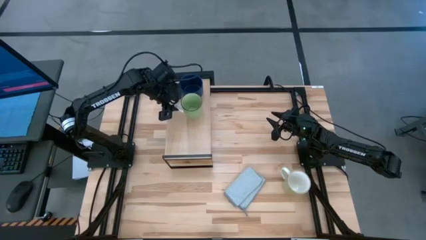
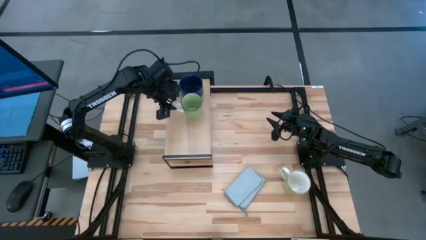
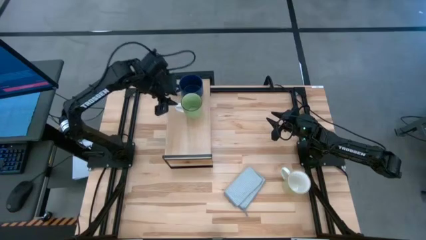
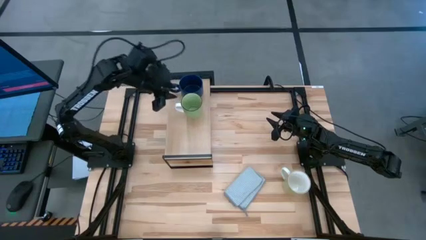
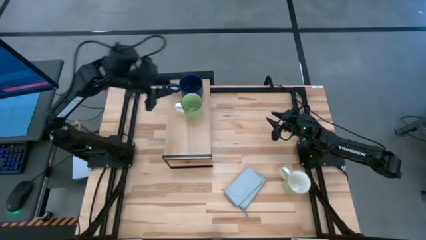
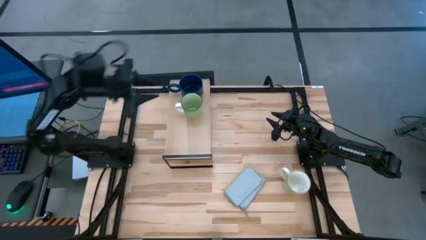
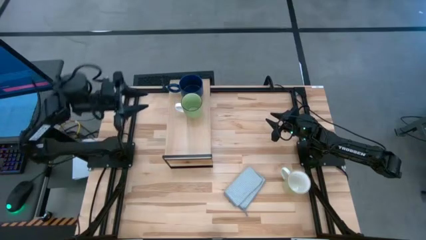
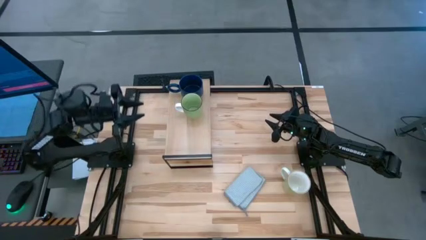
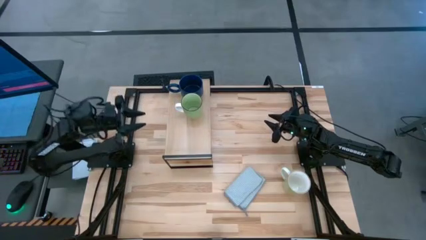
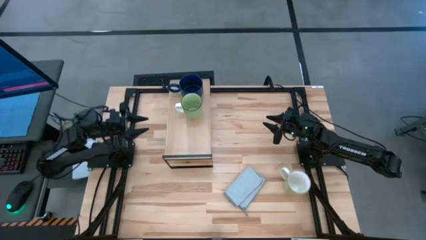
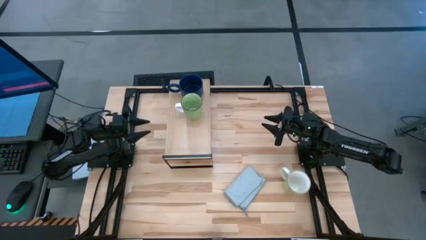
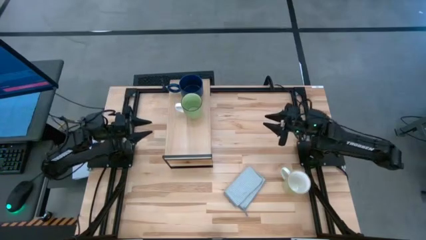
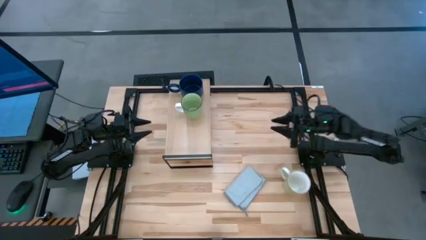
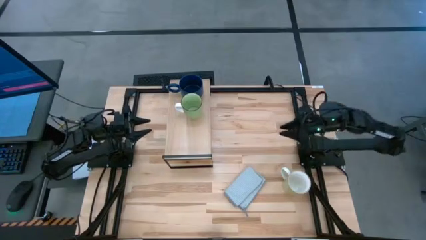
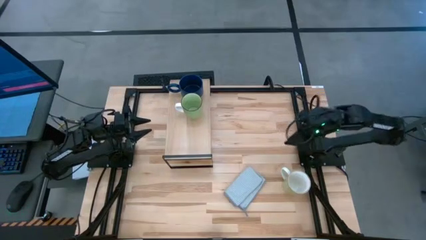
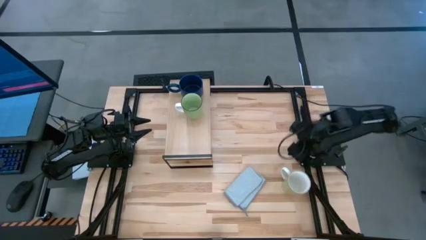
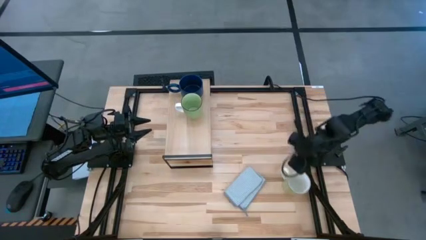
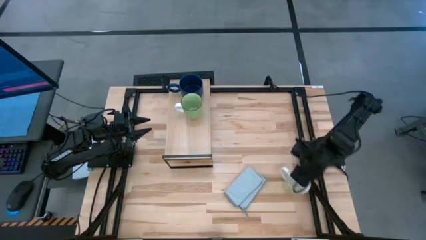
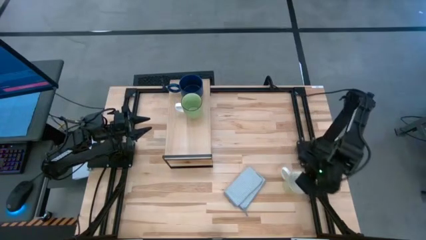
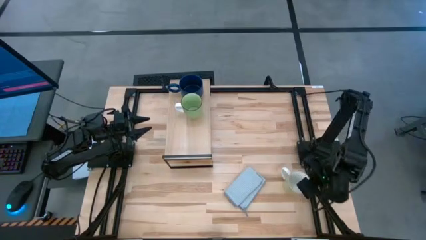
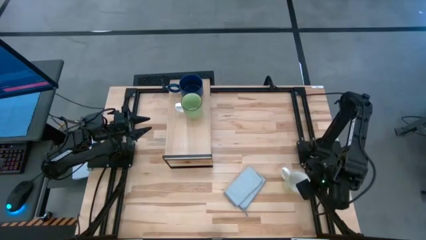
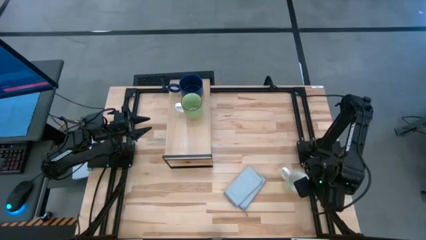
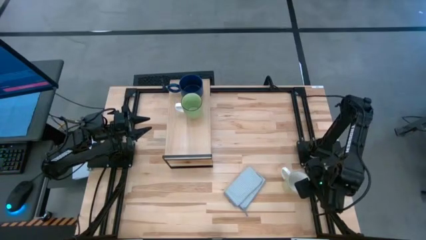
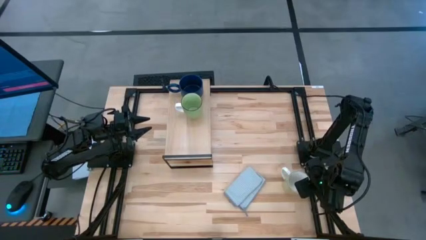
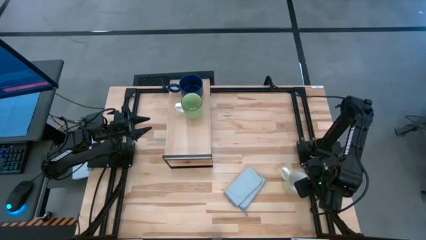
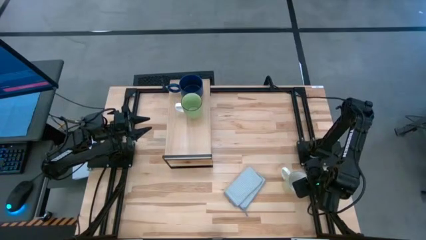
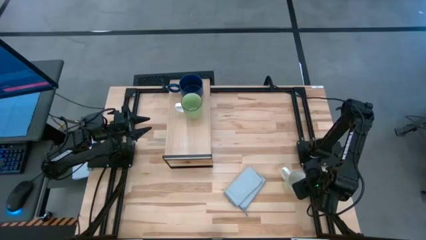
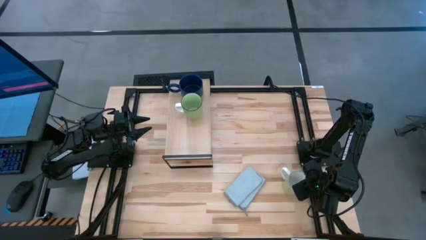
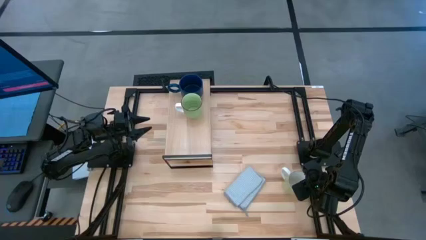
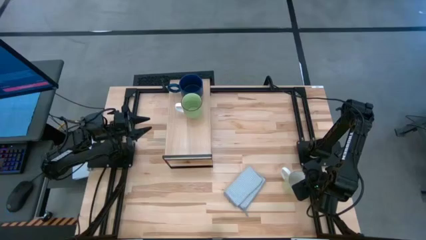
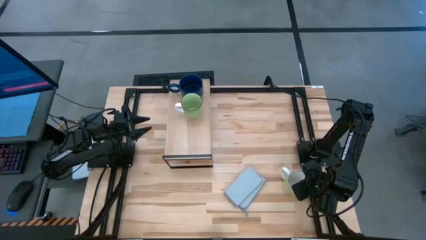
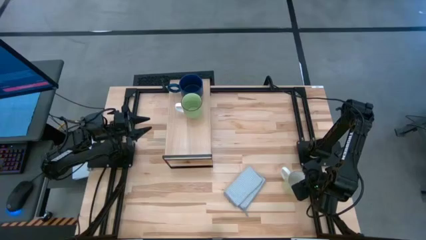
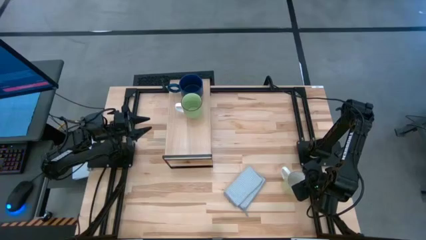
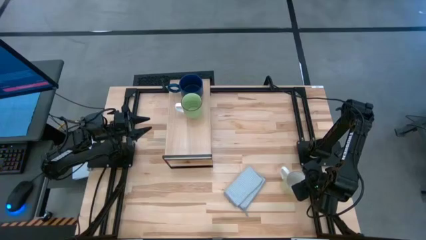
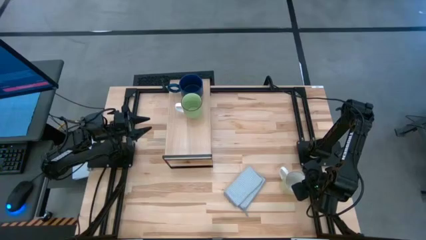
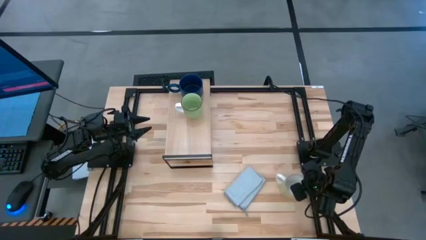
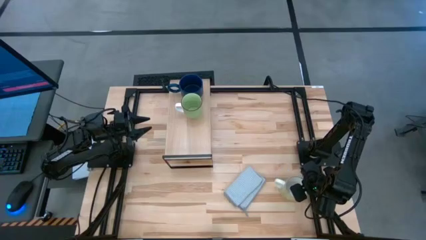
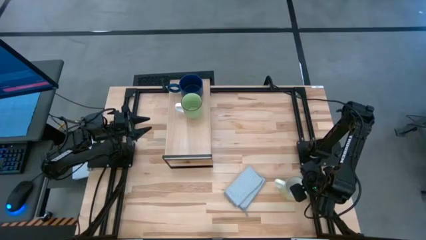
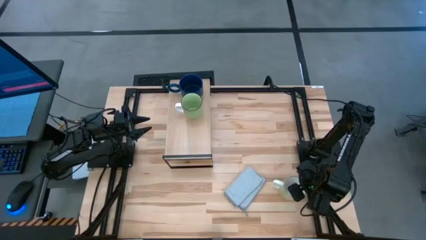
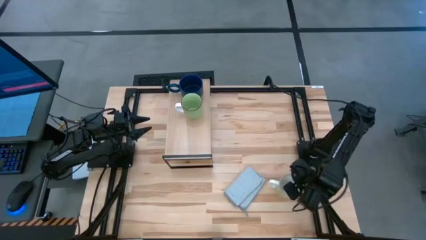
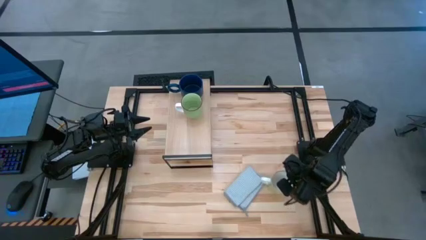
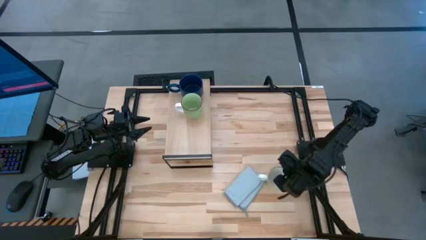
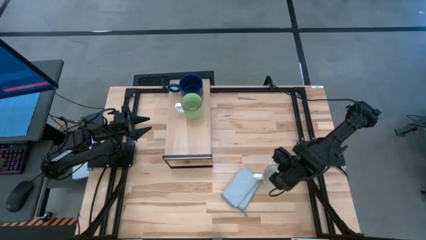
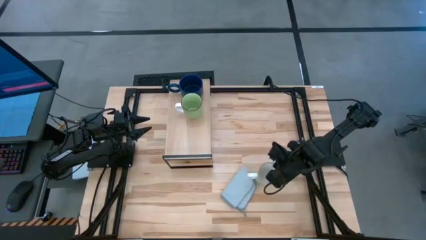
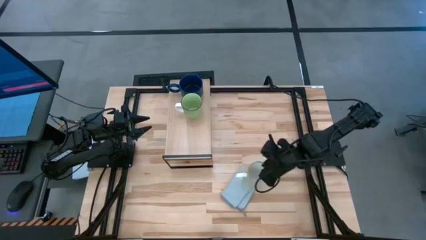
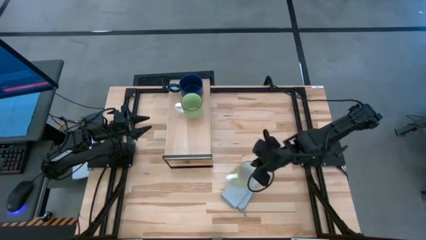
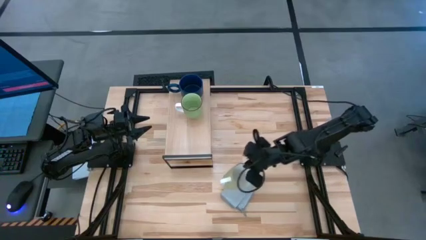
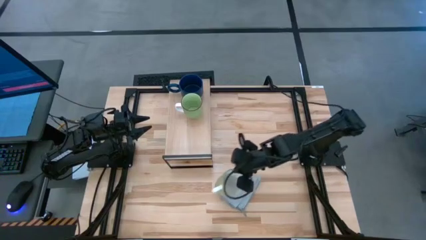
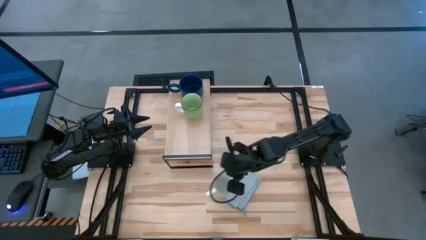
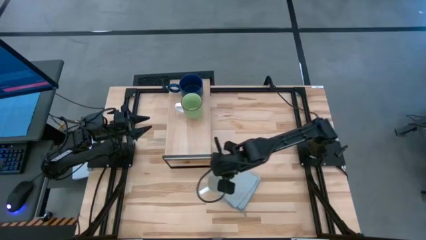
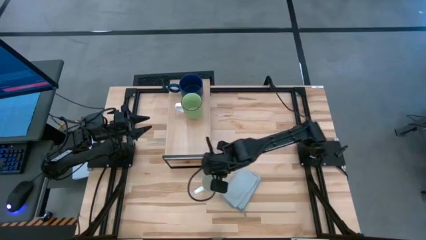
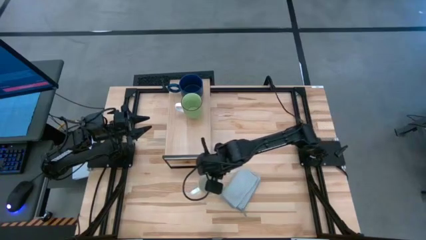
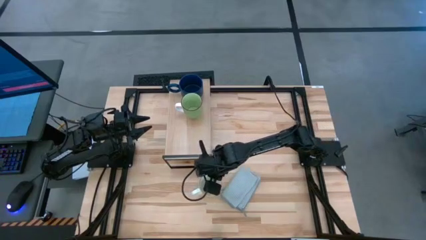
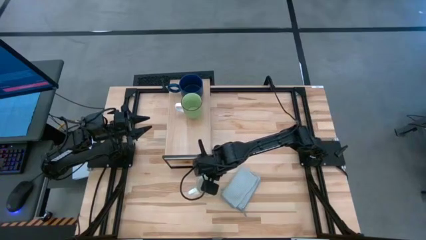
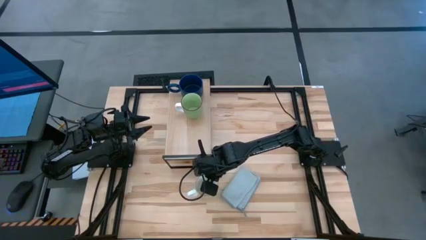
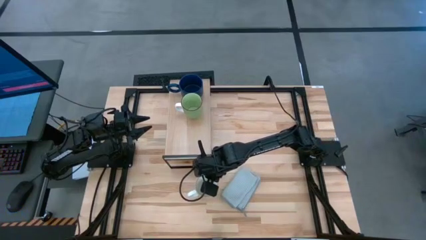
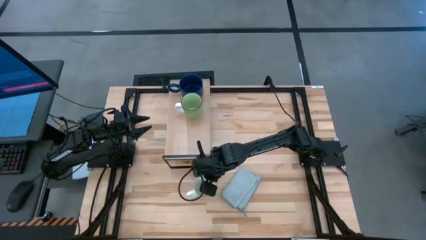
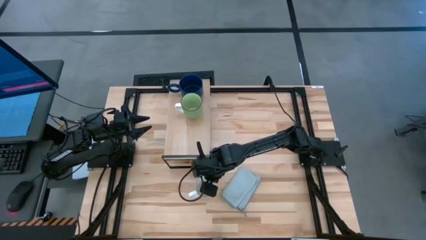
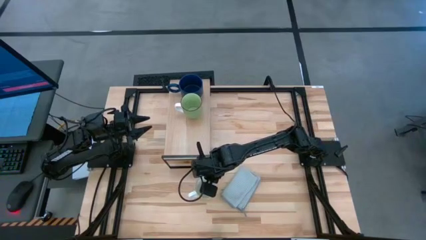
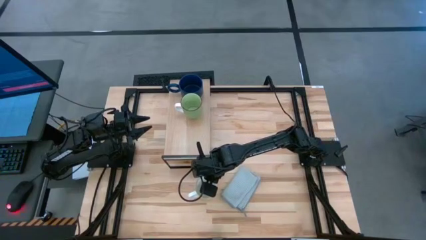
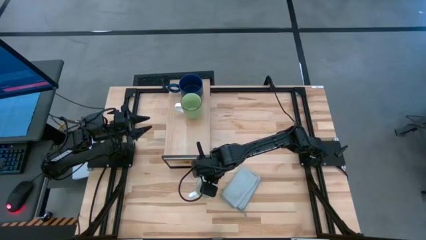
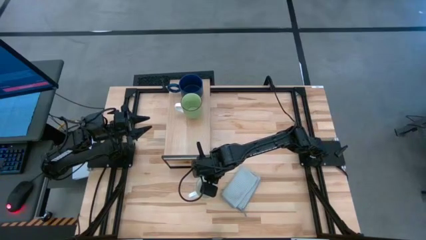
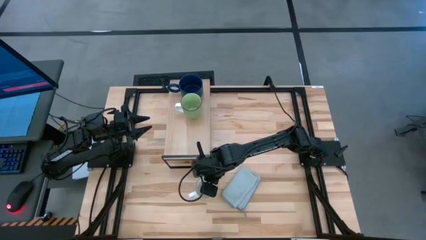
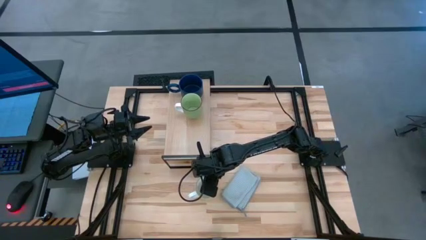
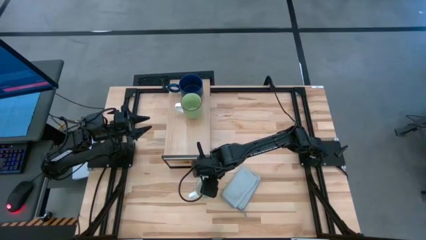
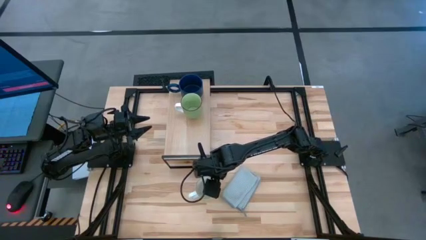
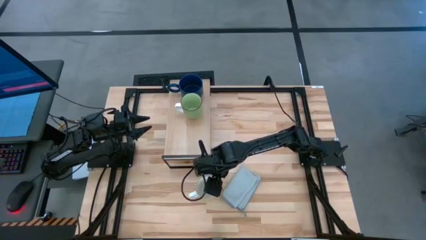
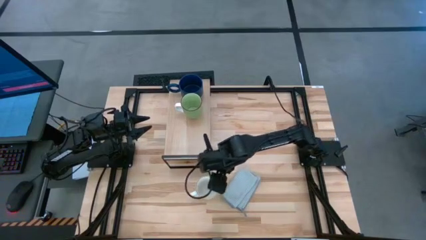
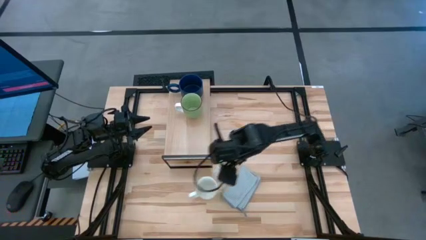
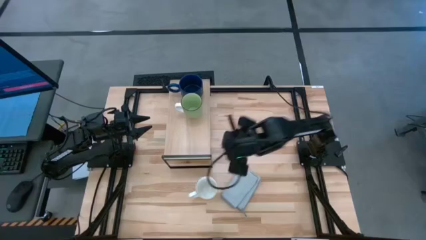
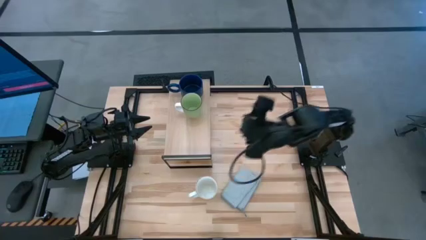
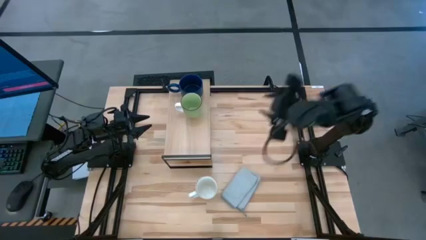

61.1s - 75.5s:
Task: Stack small to large cups/mugs on shelf
Put the white yellow mug on the shelf

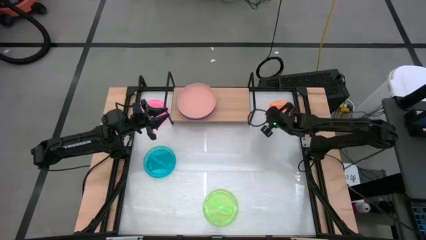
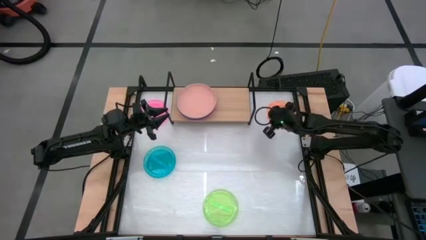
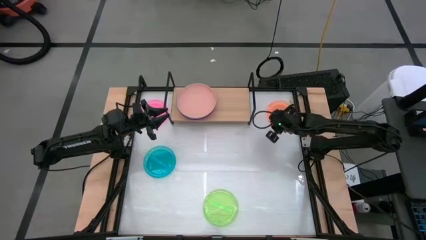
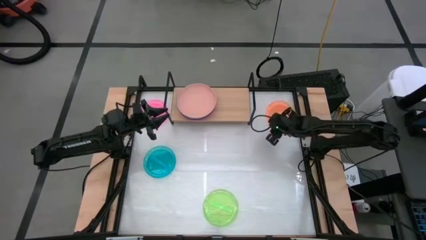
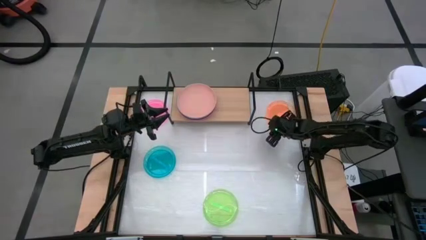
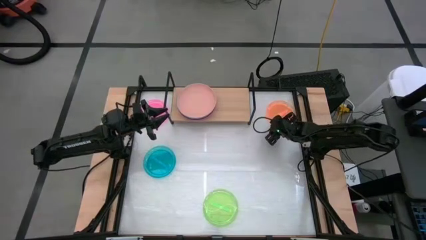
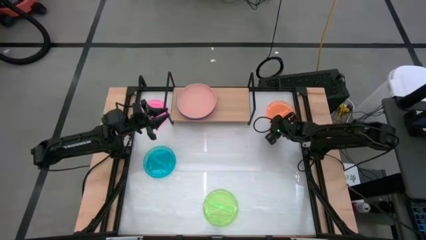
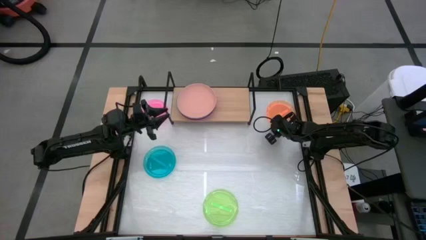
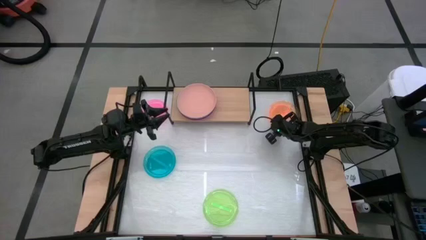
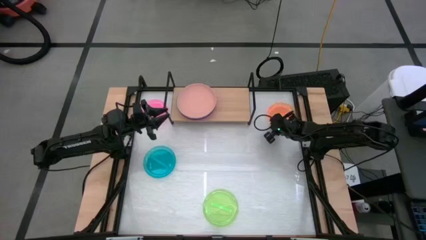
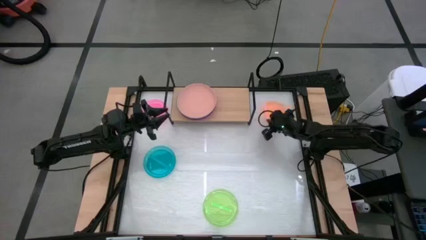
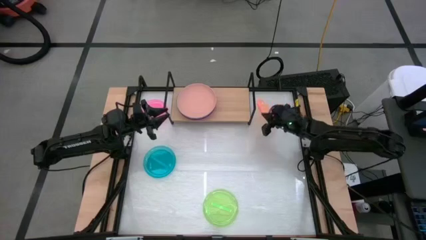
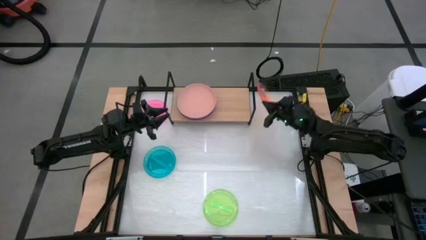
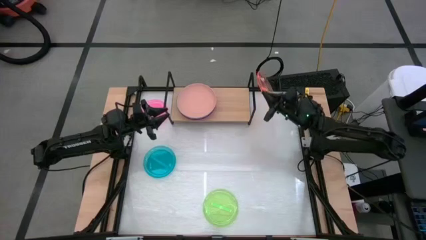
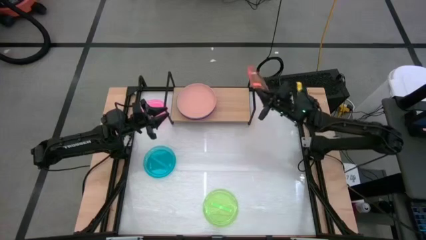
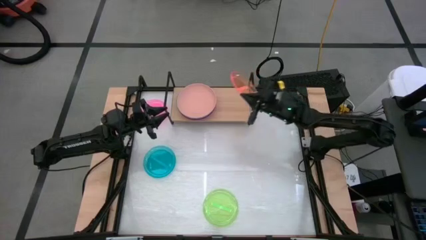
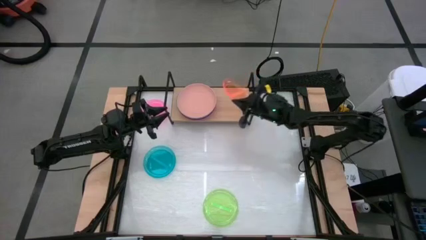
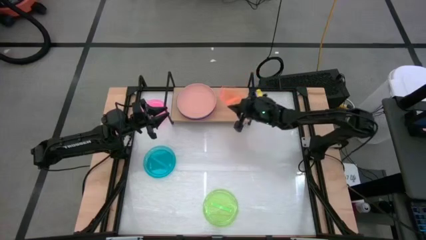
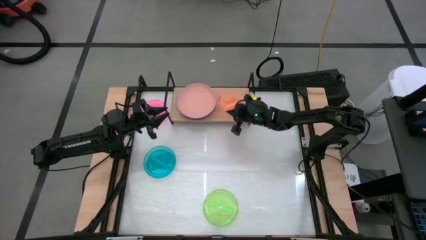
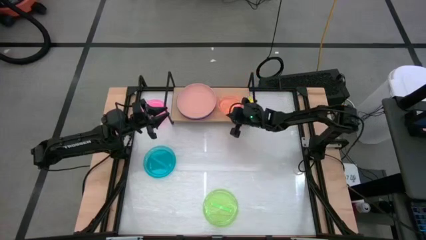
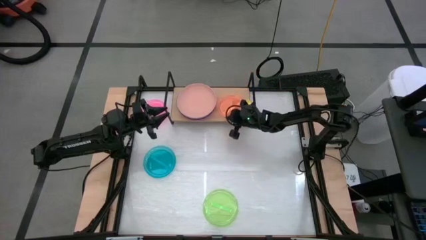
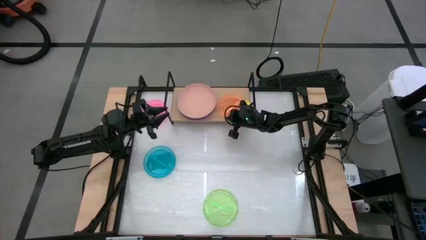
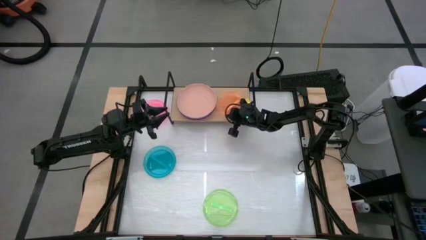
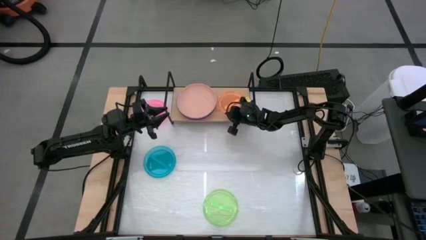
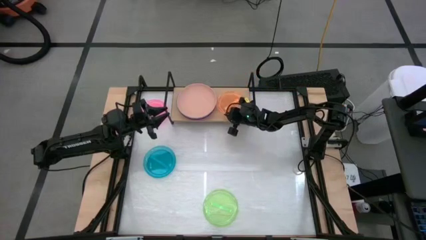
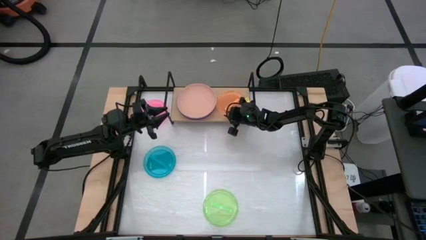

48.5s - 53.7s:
Task: Place and stack plates onto a shelf
Put the orange transparent plate on the shelf
